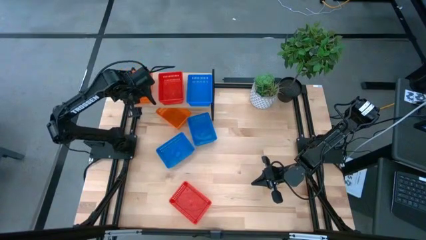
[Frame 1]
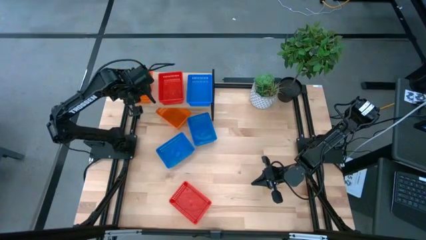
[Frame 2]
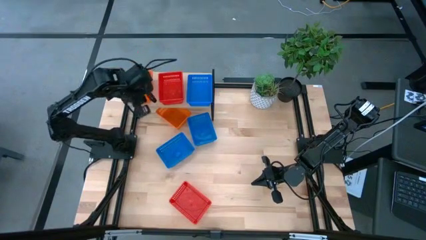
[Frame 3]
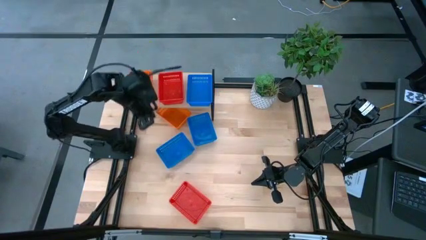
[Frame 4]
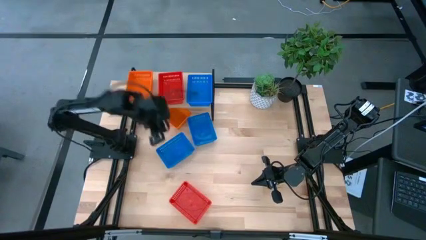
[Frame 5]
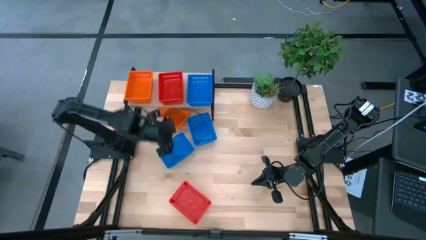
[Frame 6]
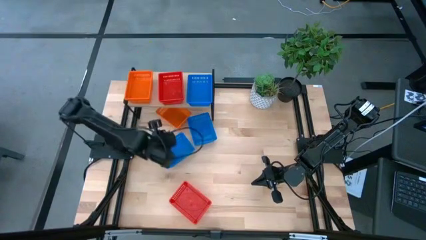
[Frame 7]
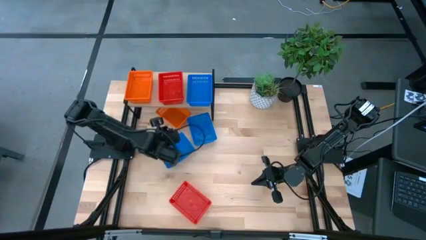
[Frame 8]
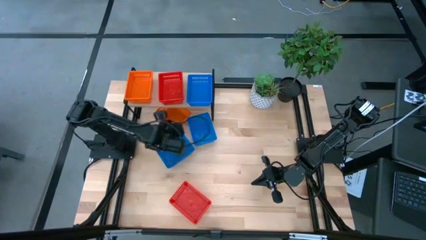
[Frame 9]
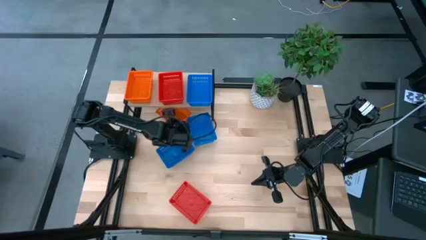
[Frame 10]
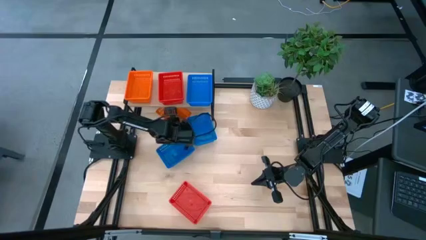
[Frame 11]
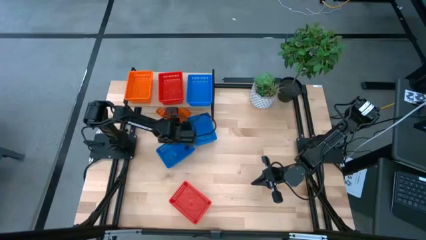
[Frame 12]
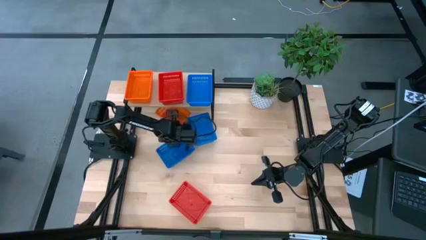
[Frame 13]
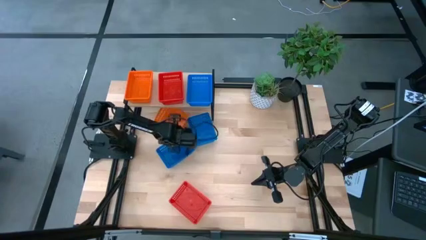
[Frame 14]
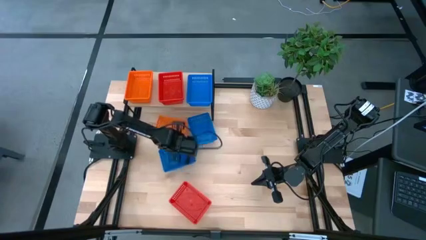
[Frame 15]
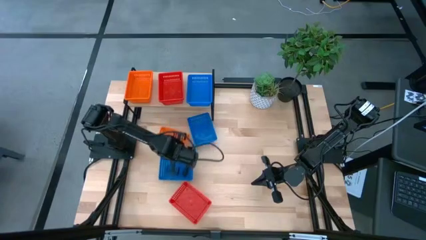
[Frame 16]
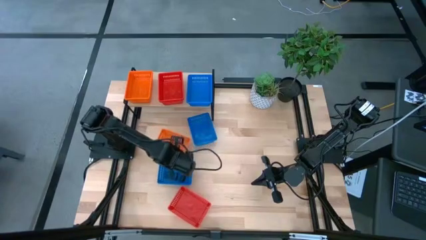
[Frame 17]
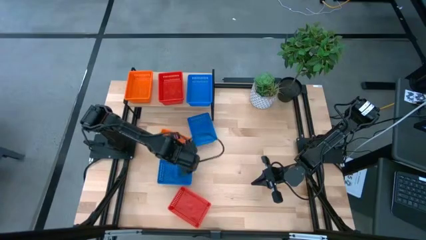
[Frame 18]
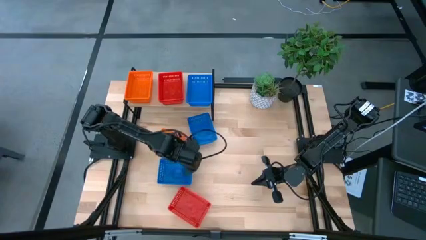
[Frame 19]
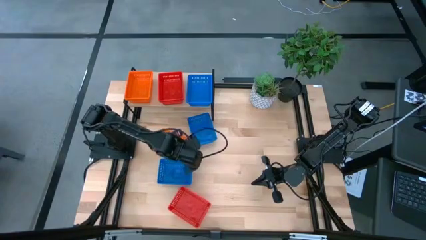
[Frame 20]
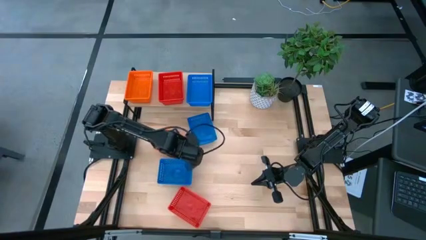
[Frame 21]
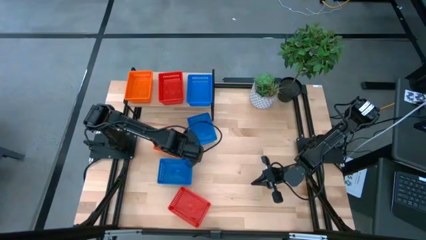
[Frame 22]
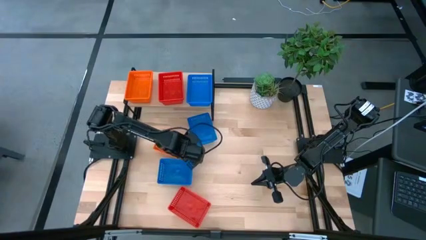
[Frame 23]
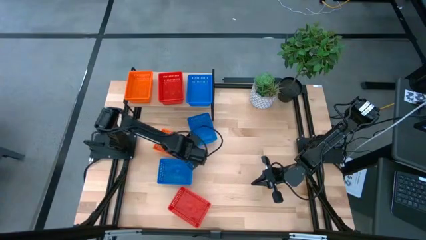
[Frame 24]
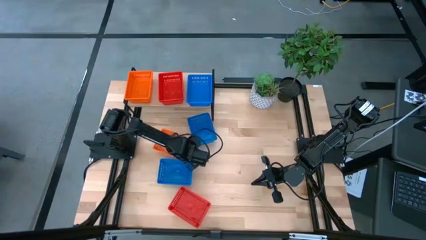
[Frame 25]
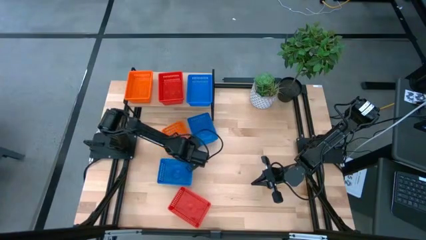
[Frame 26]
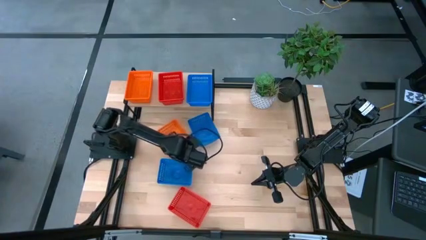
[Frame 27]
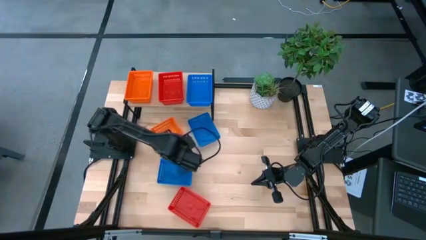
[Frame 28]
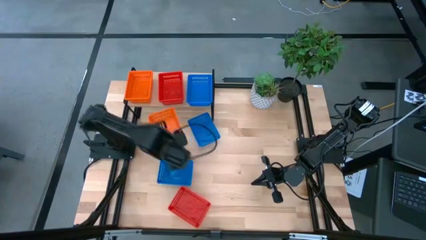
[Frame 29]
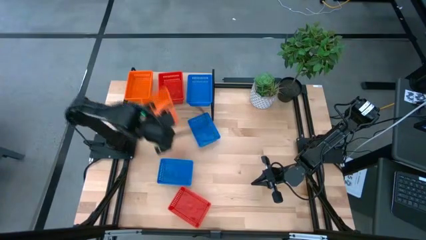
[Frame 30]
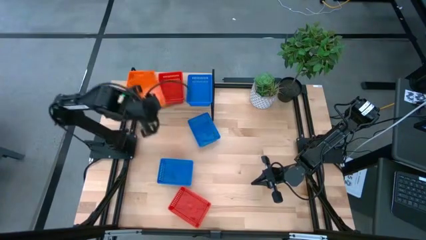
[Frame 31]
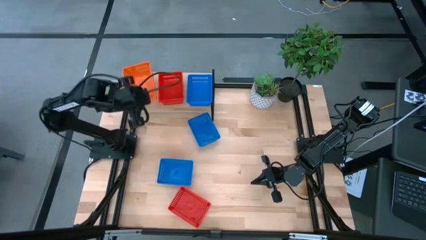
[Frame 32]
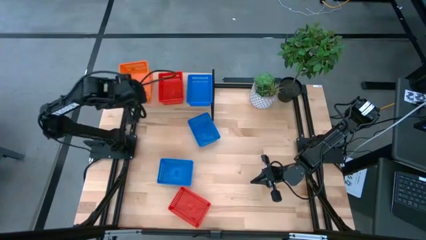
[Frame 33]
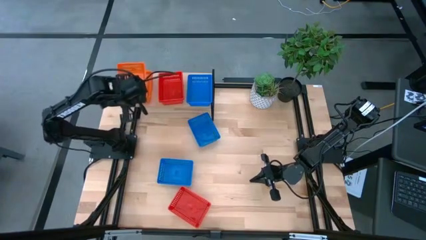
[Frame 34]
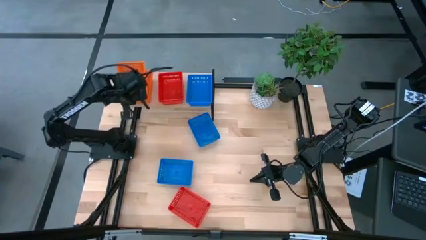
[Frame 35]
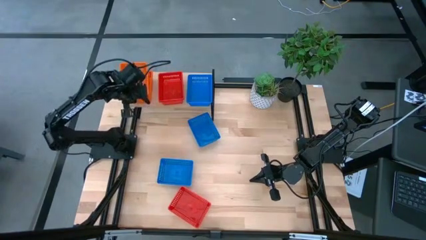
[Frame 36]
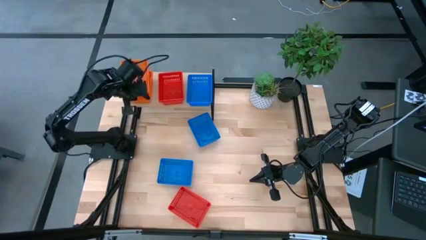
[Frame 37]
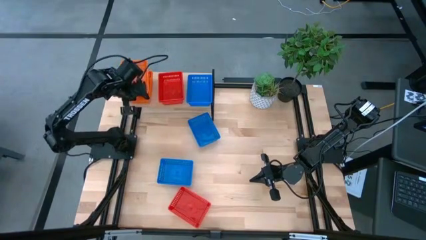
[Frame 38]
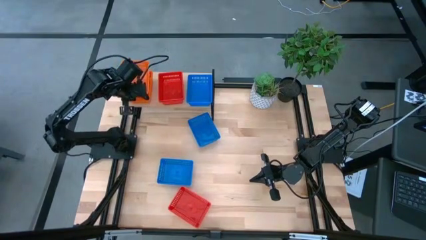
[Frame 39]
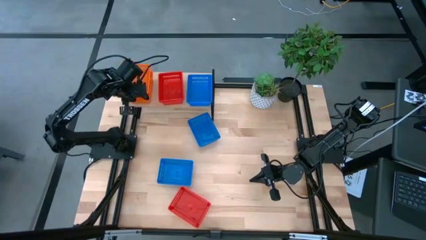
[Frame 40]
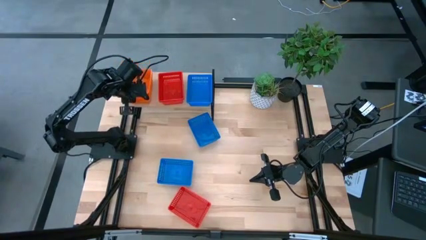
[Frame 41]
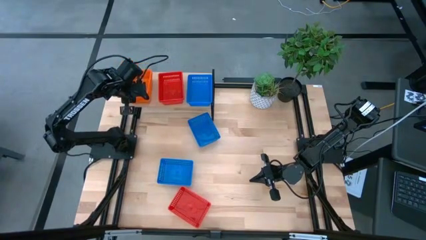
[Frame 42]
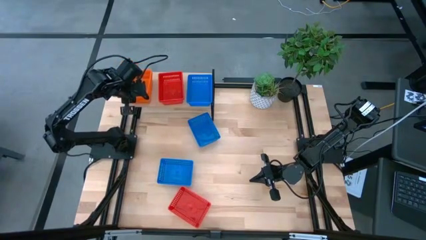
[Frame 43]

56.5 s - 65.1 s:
Task: Stack baskets on shelf by color
Stack the orange bin on top of the orange bin on the shelf

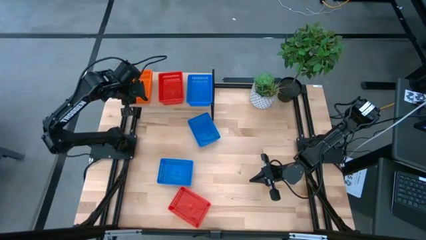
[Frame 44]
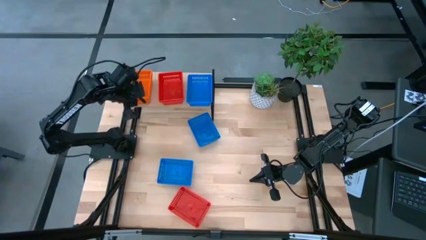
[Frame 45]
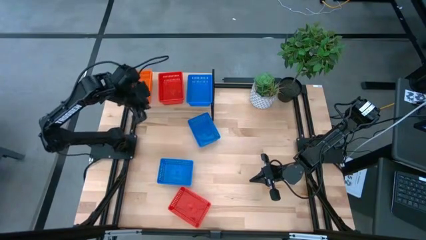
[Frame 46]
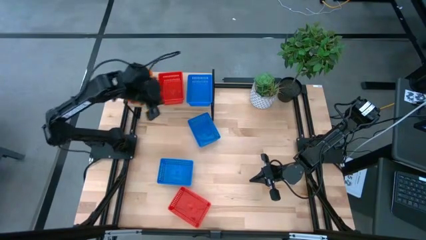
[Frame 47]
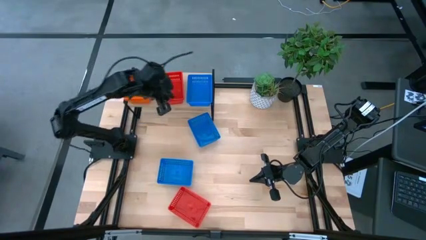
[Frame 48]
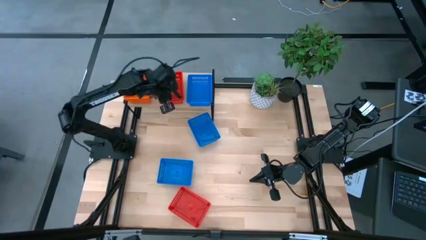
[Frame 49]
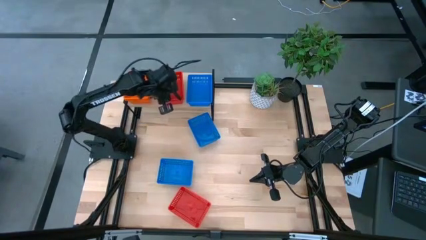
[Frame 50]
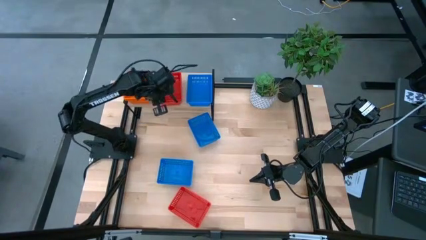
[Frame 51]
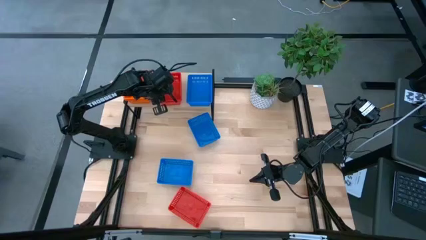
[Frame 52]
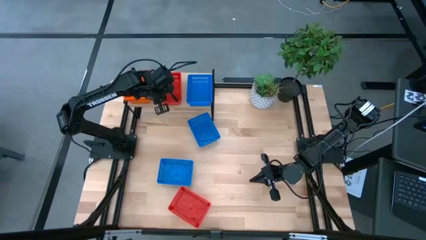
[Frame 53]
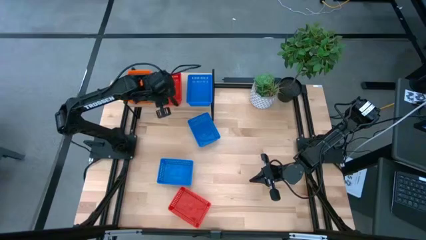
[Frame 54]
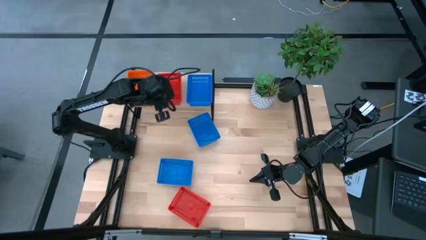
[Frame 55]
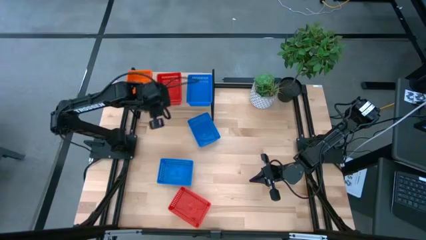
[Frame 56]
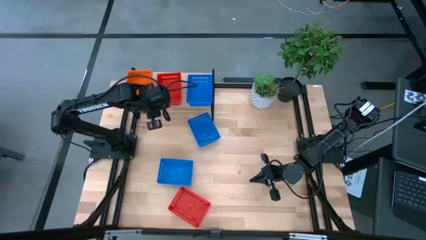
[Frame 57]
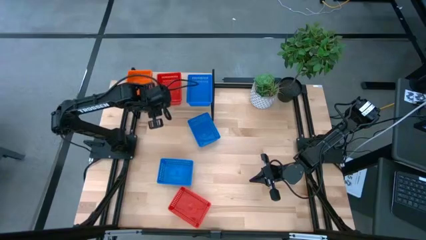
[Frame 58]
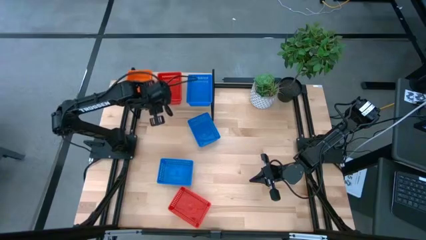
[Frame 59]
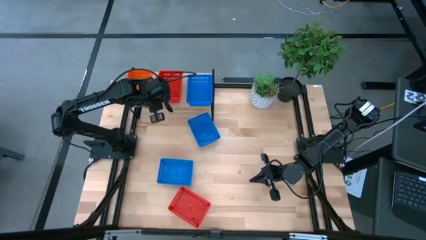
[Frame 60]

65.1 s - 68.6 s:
Adjust the red bin on the shelf

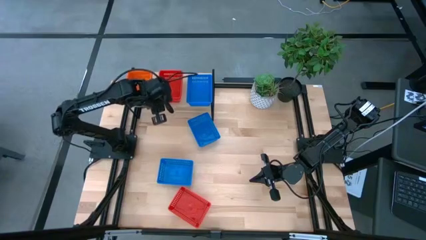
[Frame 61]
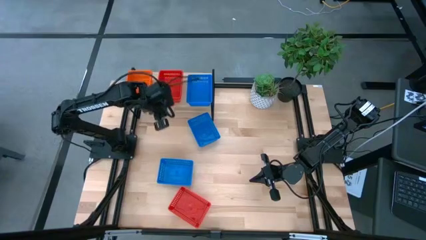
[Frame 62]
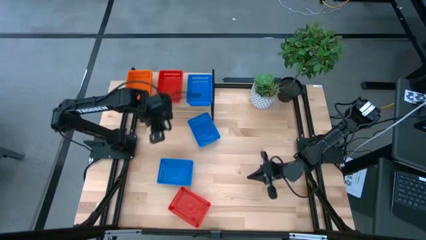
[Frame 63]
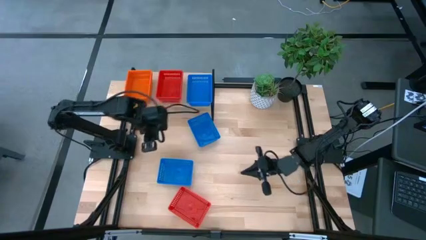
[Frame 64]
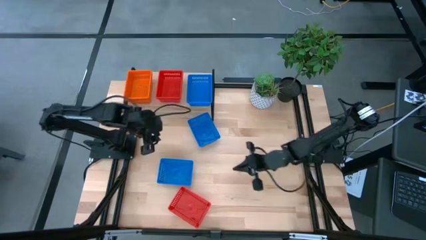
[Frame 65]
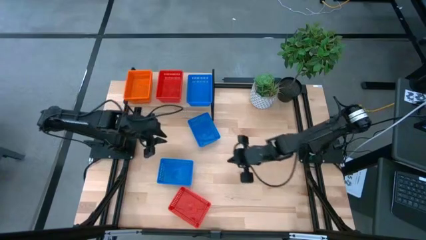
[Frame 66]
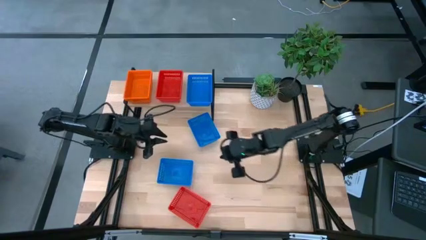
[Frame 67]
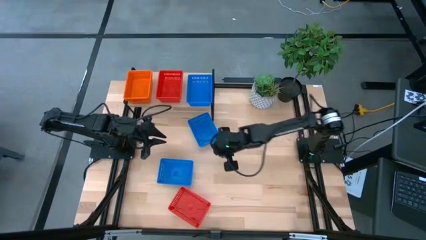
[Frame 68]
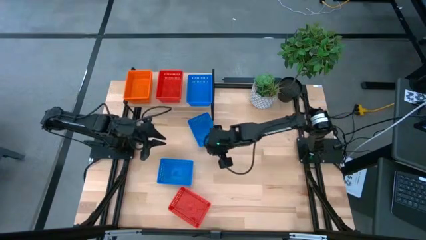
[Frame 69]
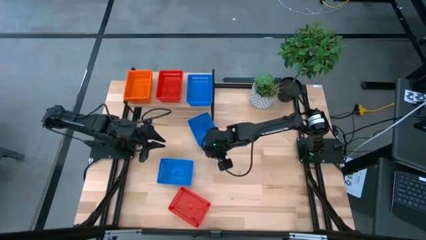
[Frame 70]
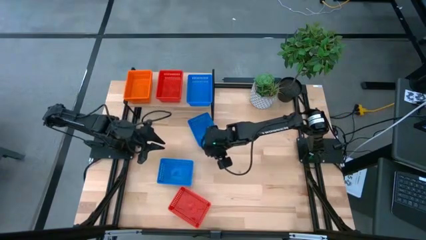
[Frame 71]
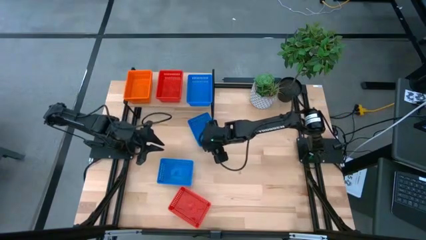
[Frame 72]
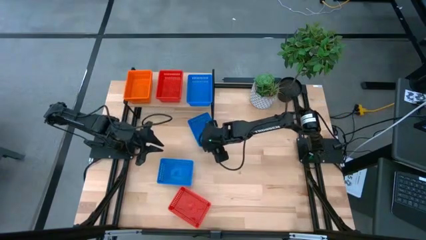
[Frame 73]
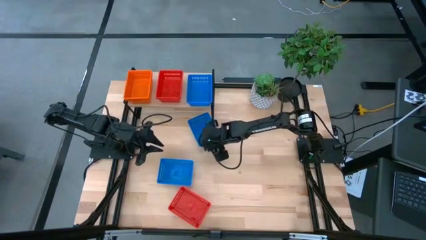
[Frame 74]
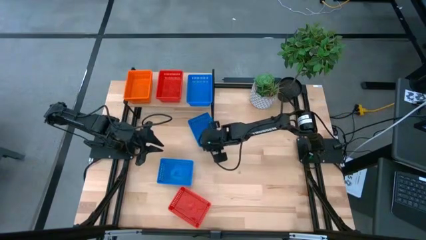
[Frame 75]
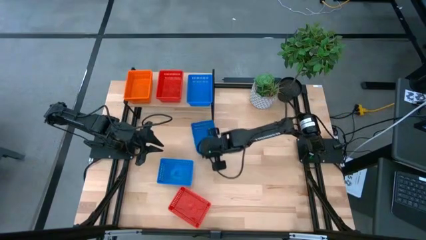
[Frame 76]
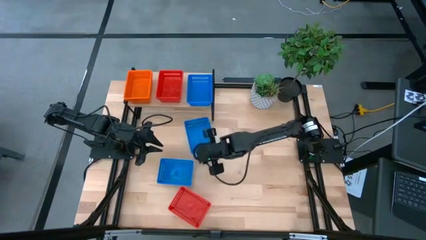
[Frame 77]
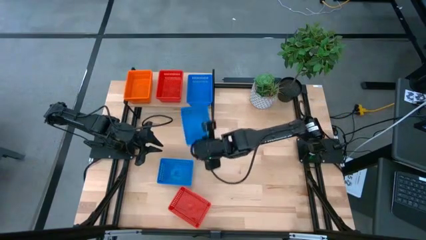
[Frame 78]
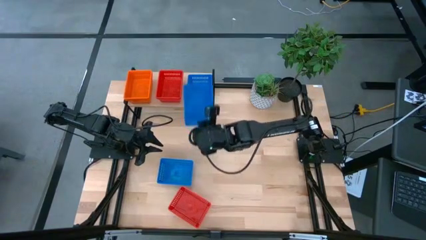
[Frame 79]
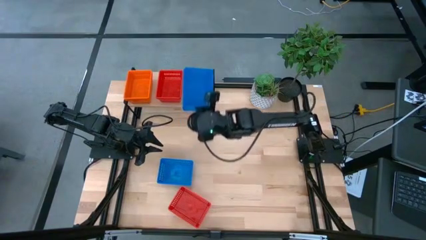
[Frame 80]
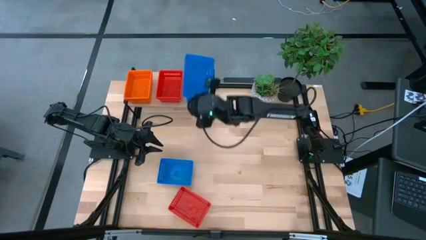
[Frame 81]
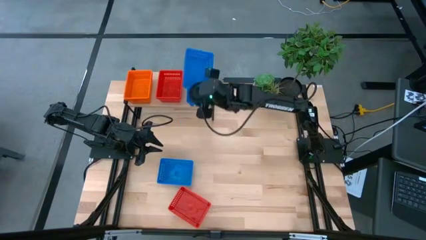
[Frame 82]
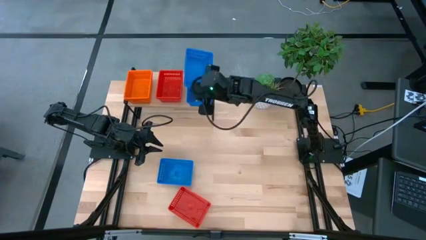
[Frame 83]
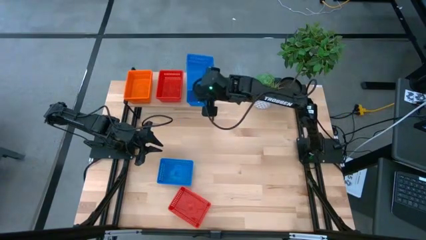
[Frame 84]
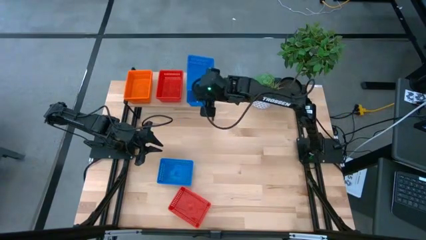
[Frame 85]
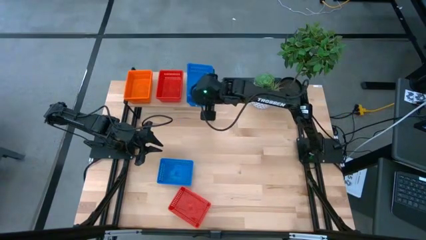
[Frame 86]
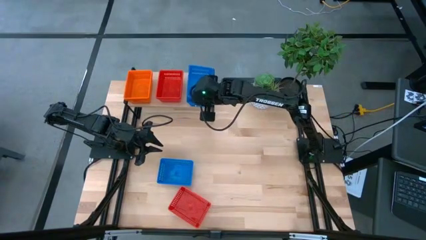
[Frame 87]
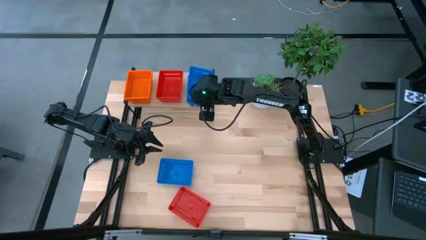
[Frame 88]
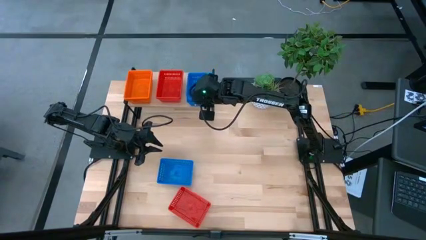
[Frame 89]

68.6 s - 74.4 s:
Stack the top blue bin on top of the blue bin on the shelf
